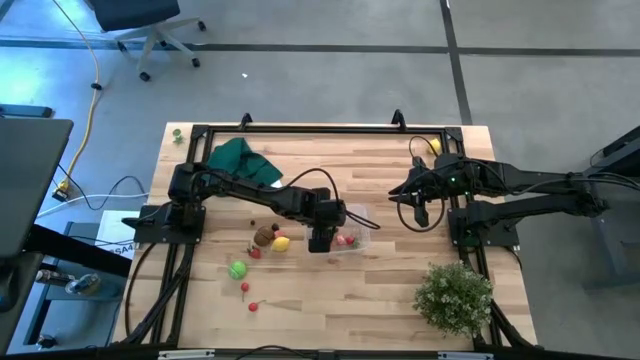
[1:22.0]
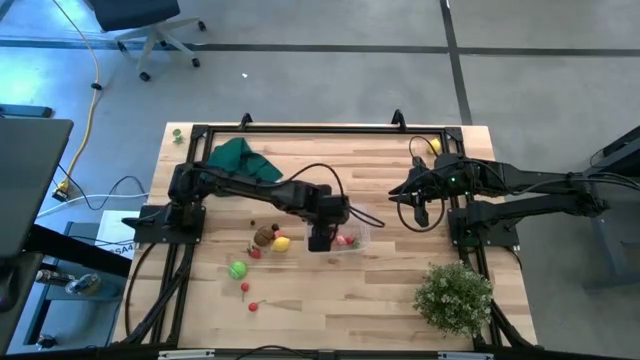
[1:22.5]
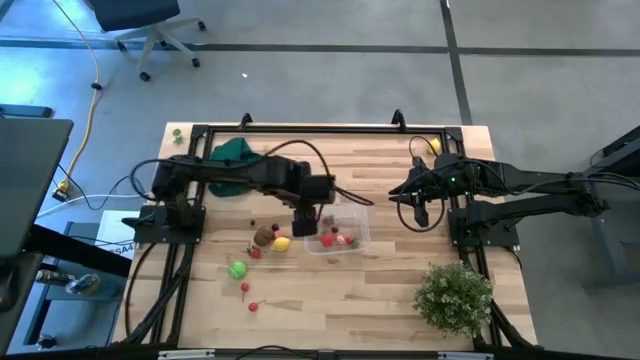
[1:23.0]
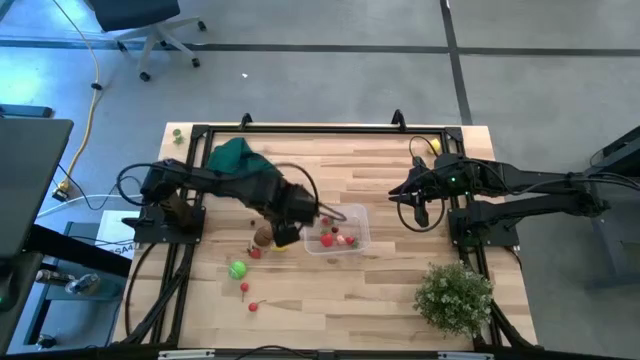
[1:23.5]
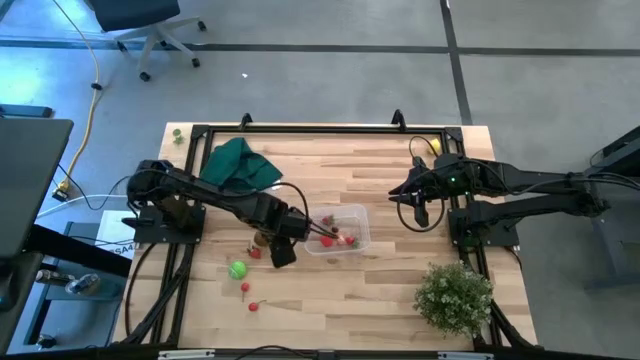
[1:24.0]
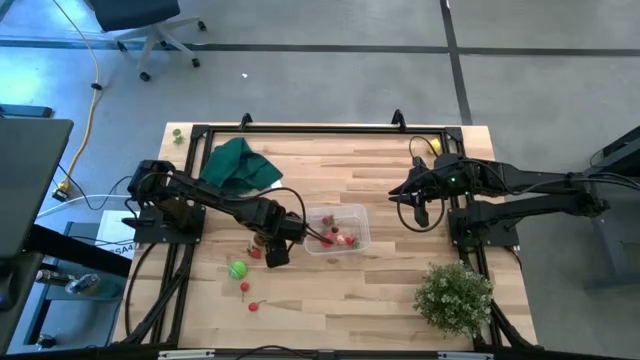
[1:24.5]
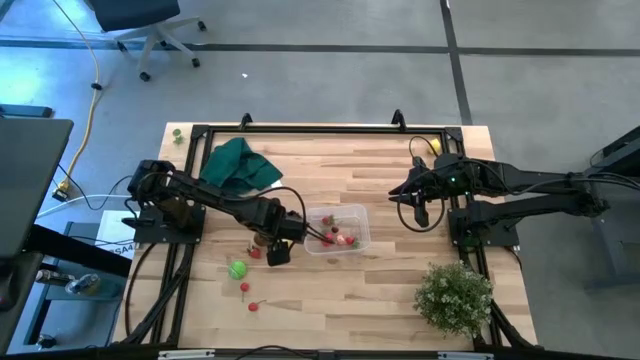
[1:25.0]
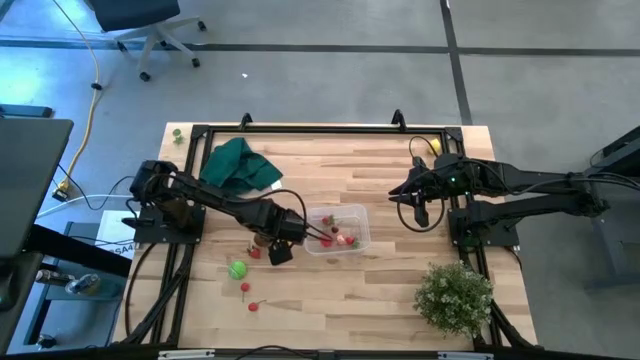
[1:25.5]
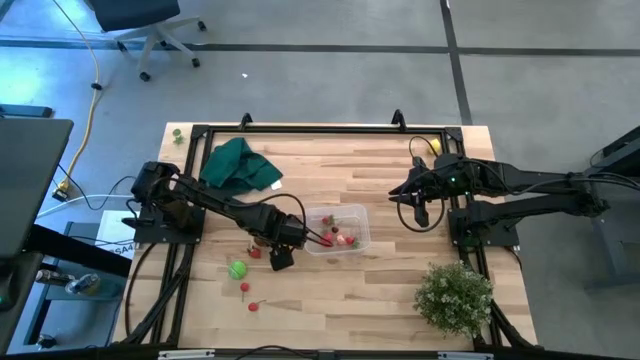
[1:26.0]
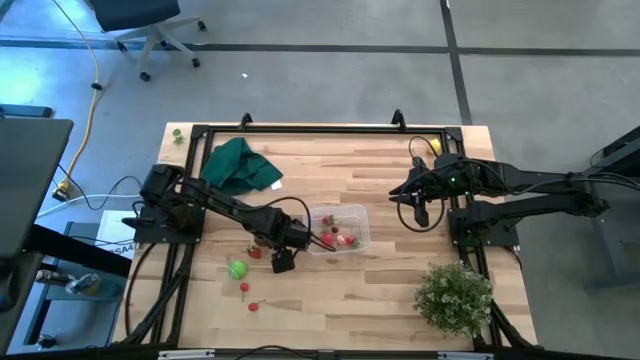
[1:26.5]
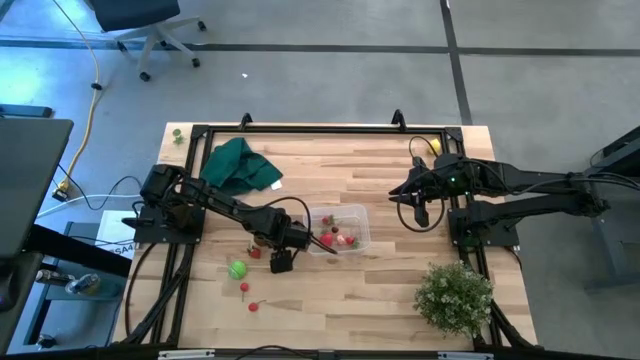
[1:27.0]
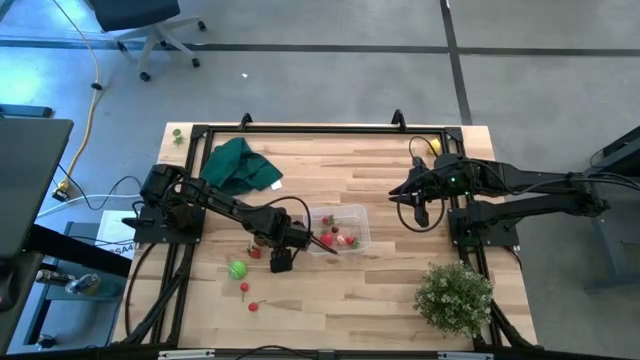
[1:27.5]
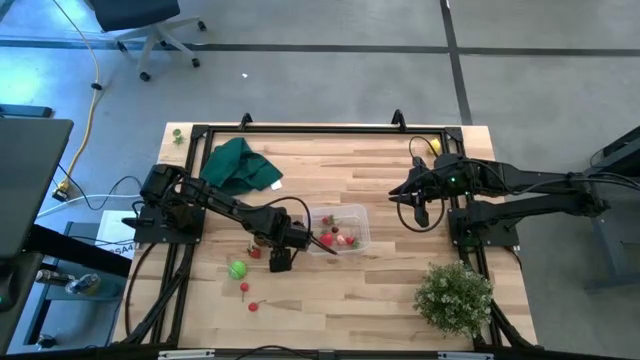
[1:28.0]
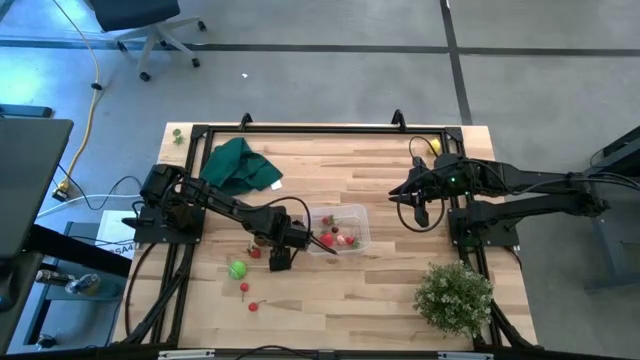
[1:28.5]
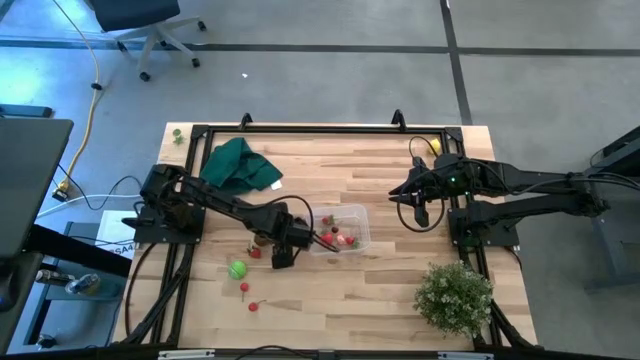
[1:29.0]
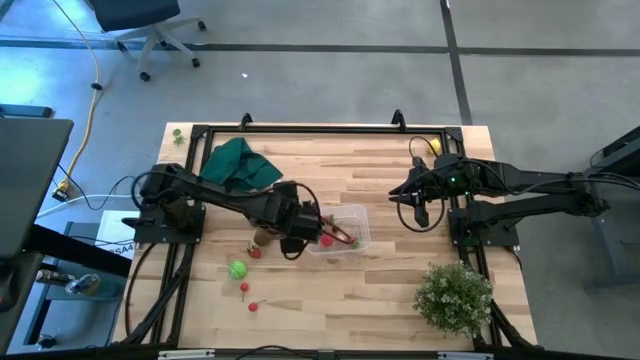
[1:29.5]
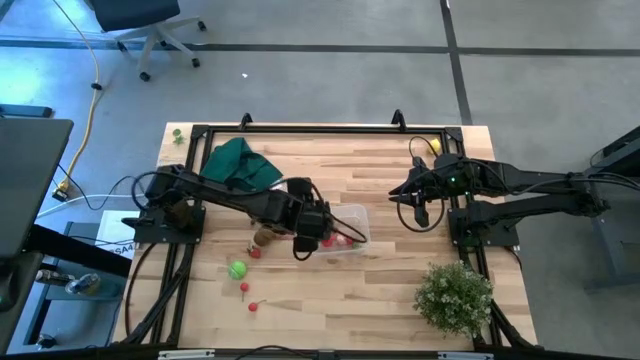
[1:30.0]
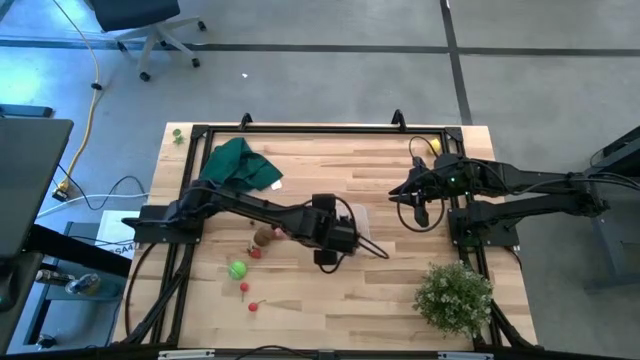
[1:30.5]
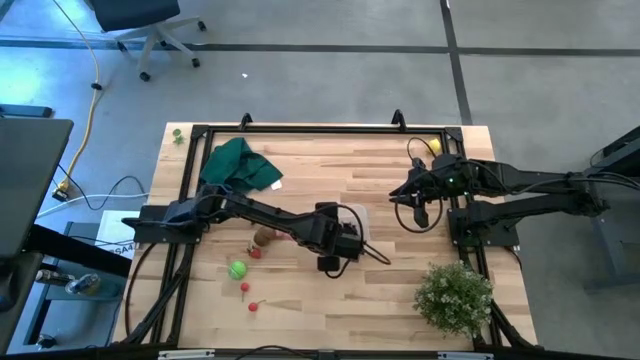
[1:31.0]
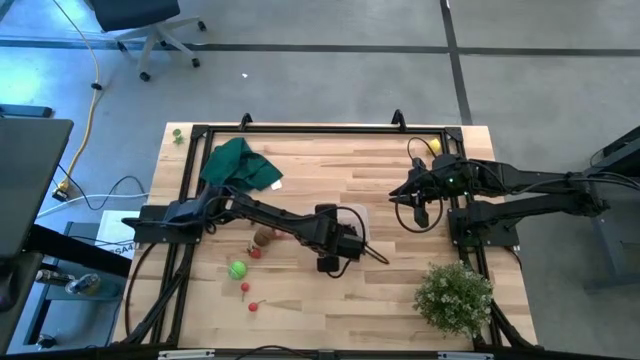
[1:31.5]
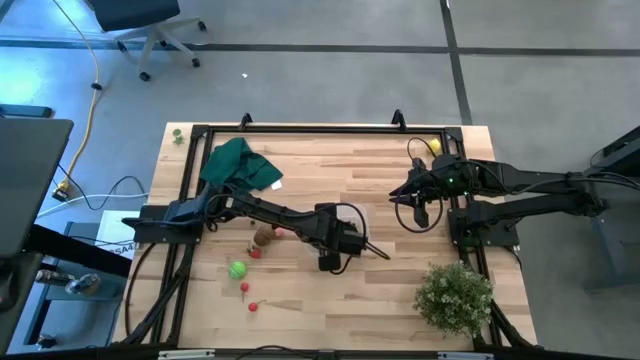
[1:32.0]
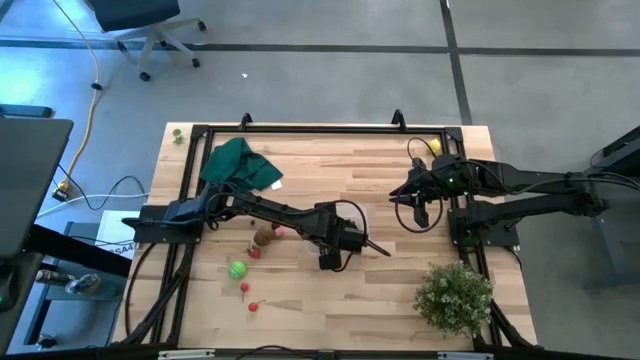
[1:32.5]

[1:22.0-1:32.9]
Task: Pick and placing Produce into tupperware
Put the bottom yellow lemon into the transparent bin

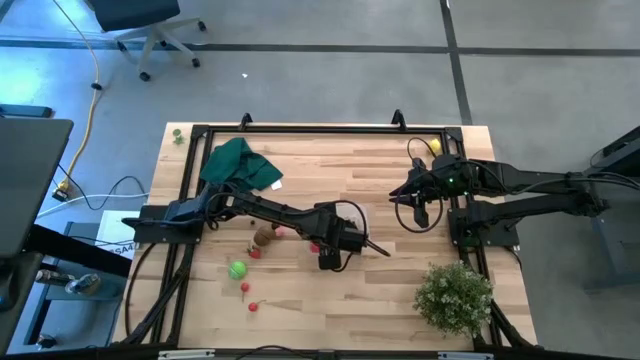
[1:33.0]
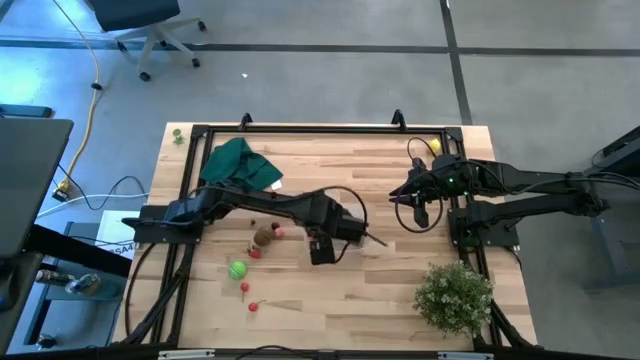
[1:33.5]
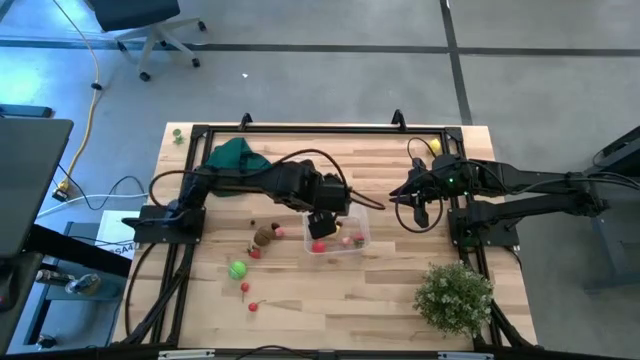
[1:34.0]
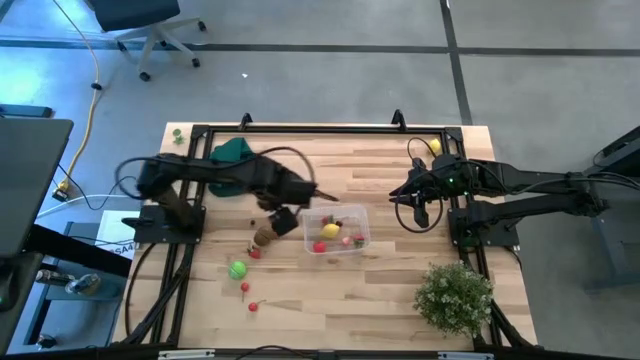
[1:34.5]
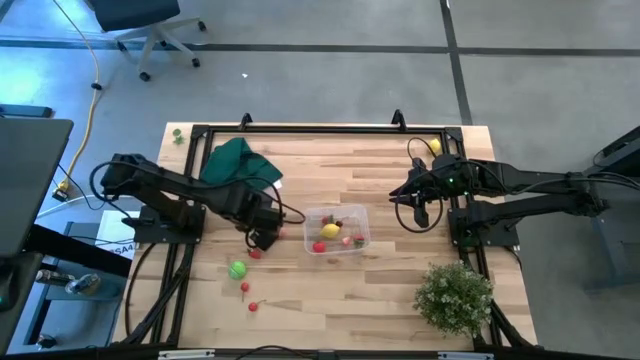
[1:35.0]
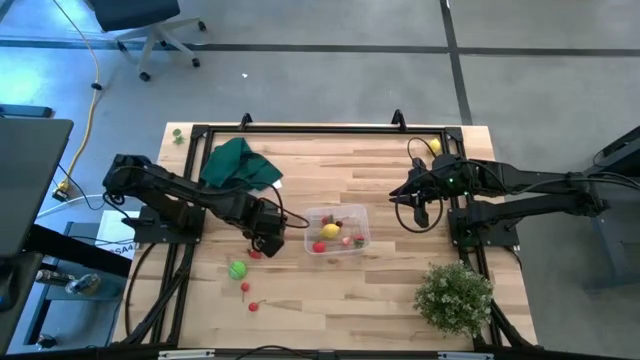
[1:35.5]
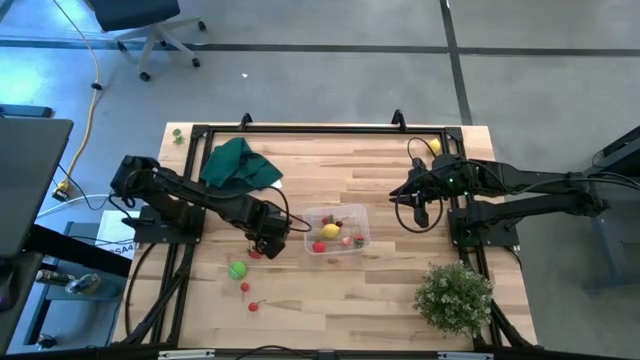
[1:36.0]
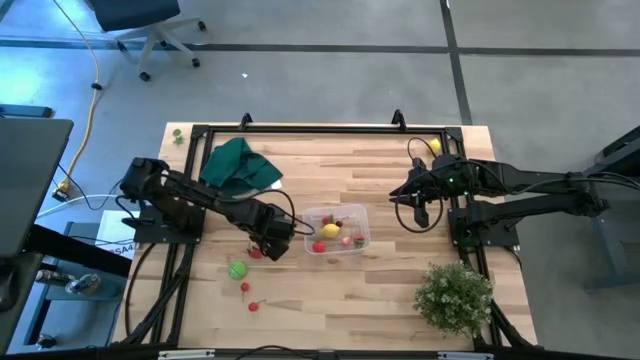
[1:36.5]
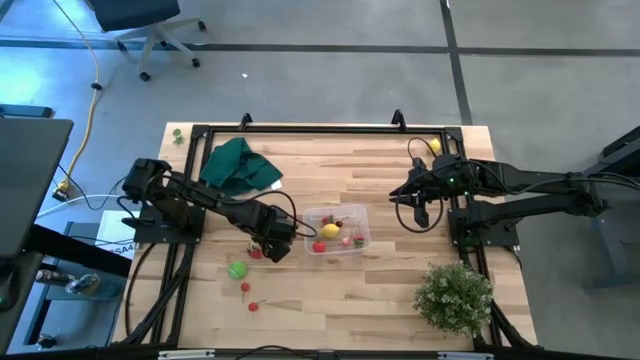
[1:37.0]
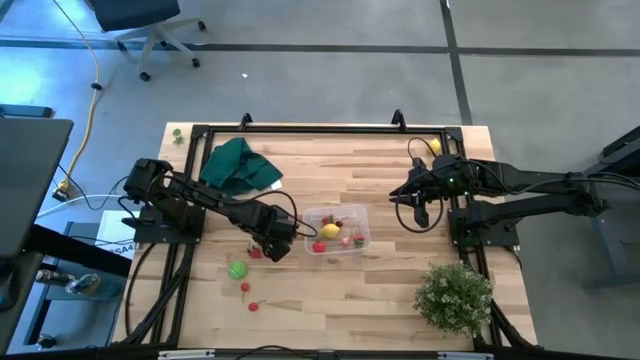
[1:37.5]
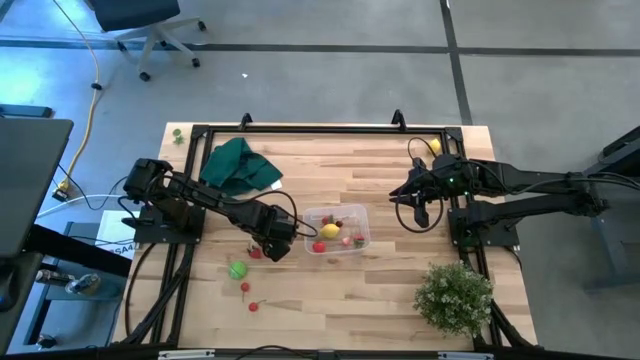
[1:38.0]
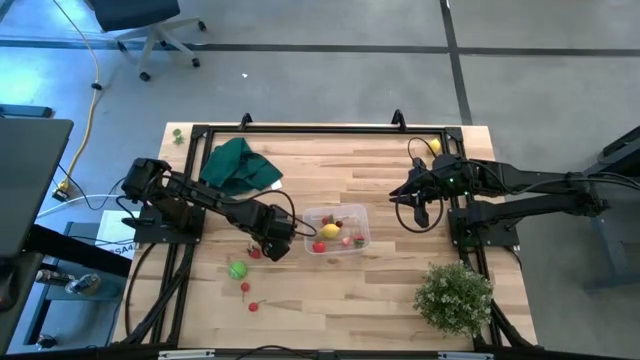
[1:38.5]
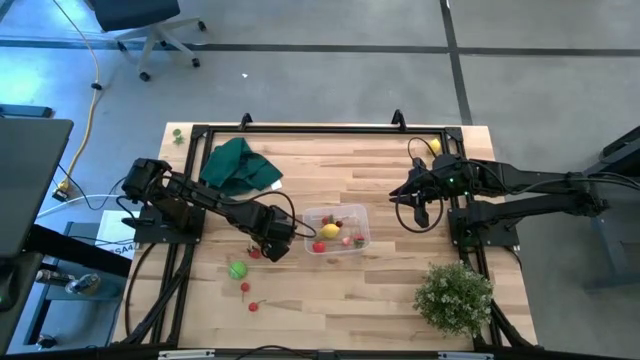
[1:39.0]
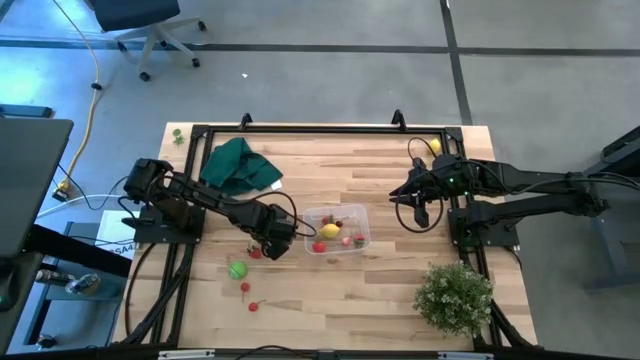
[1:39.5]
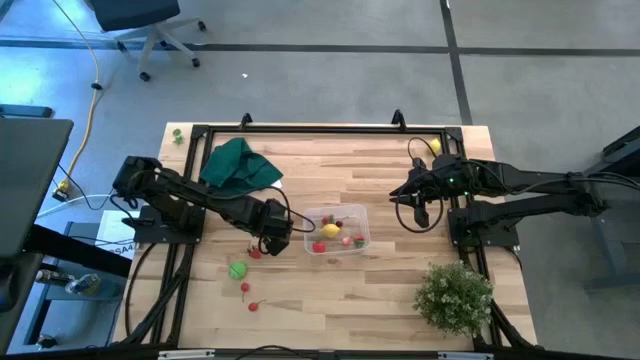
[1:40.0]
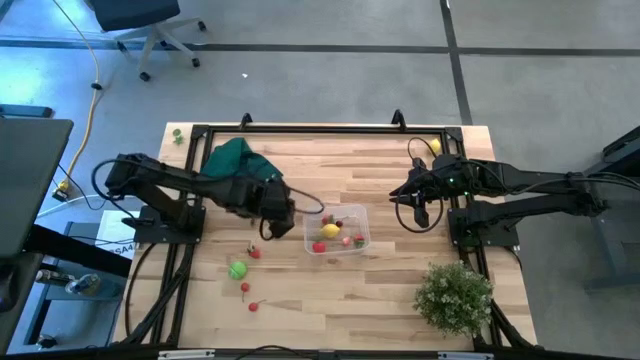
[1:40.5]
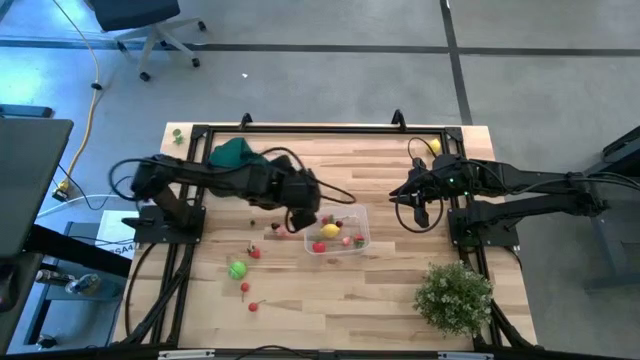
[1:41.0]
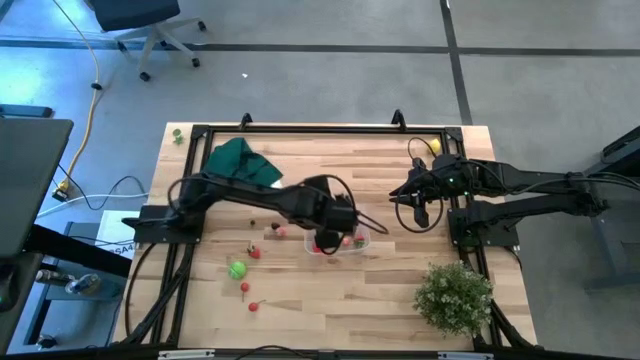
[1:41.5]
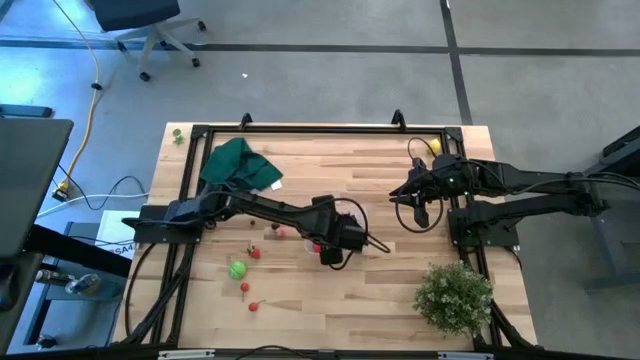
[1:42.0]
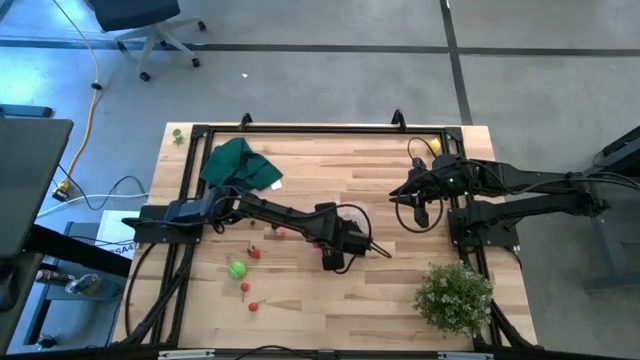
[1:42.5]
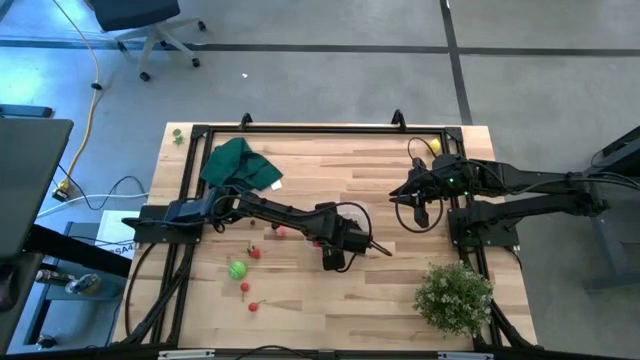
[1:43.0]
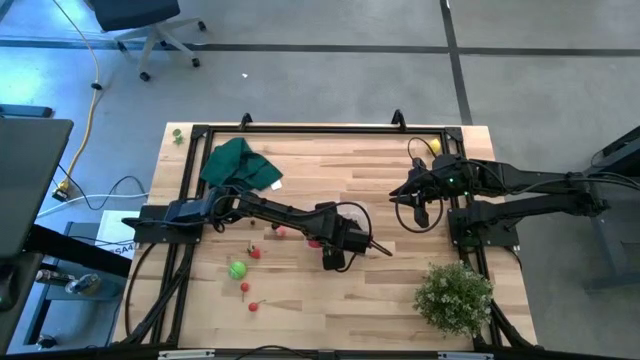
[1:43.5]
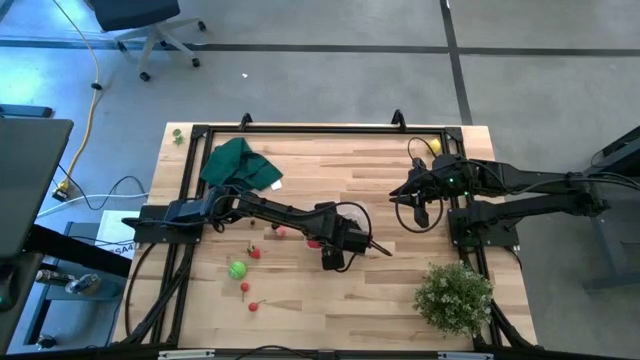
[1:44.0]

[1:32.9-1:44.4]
Put the brown kiwi into the transparent bin
